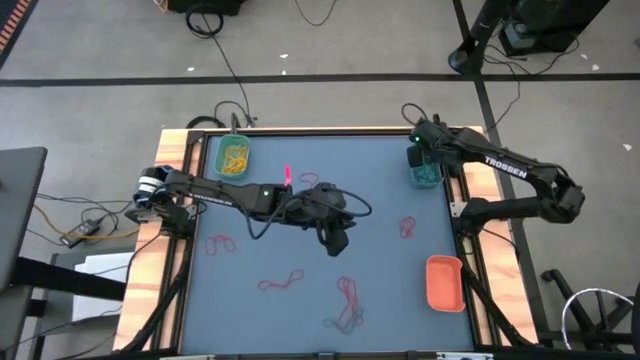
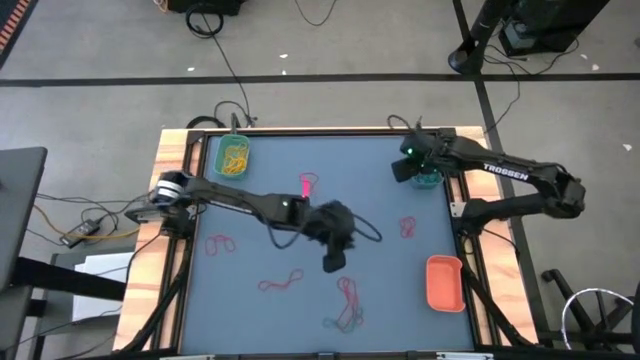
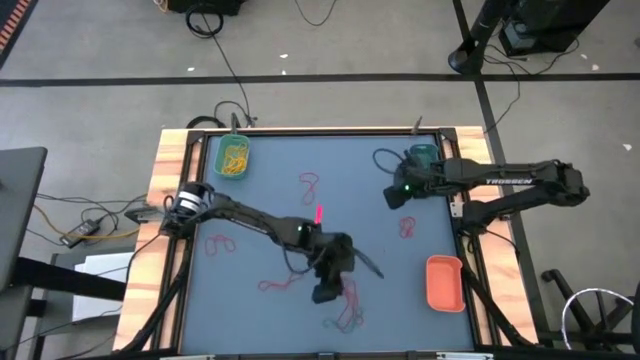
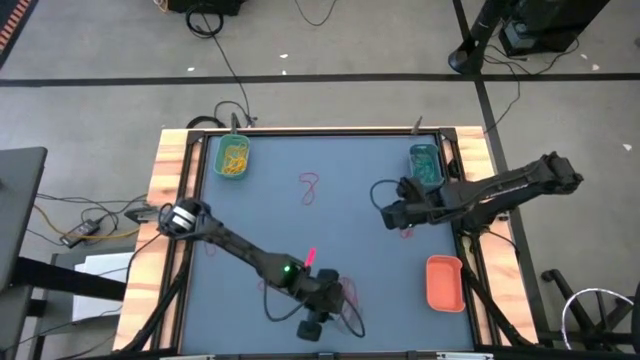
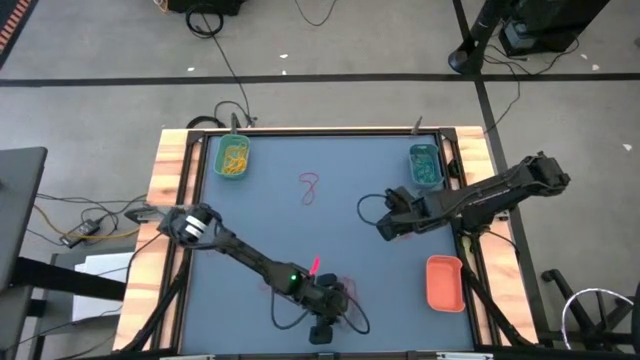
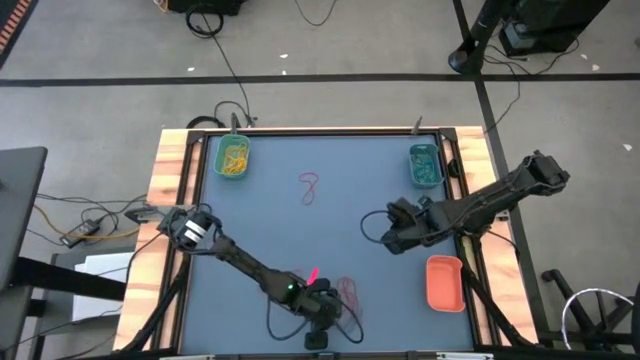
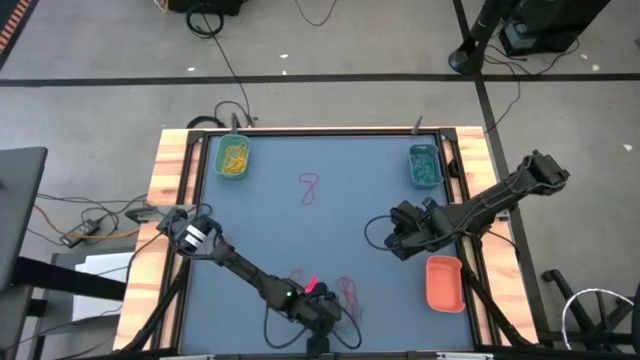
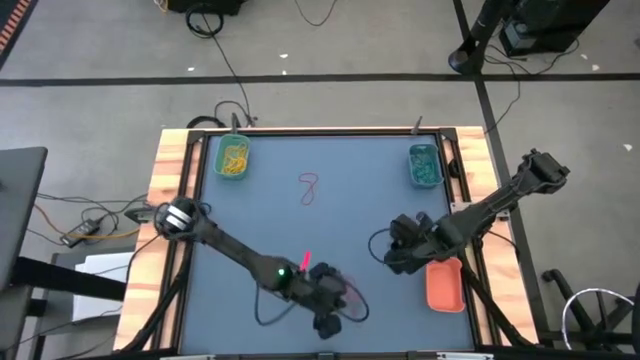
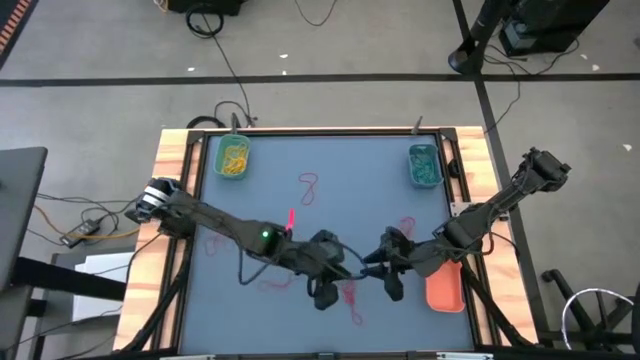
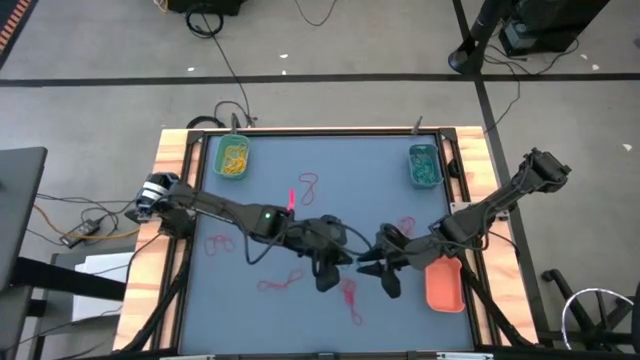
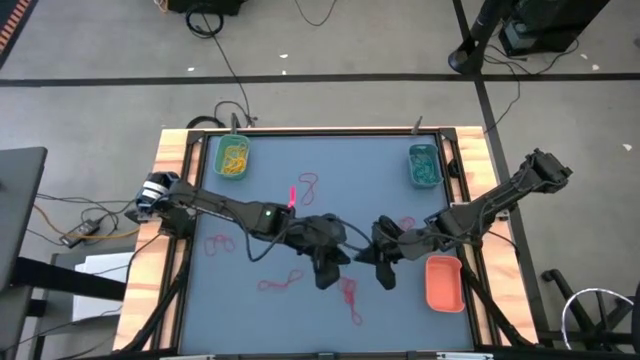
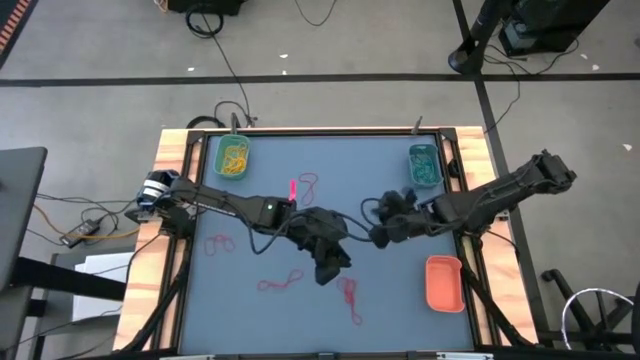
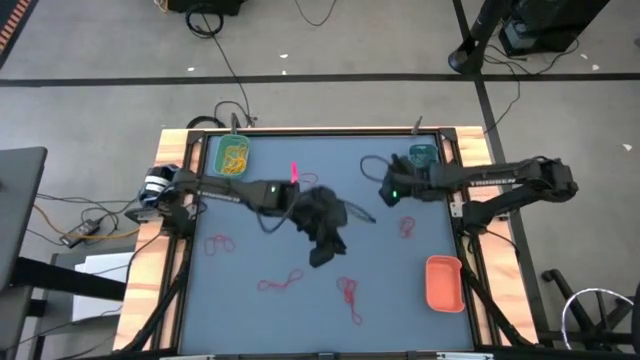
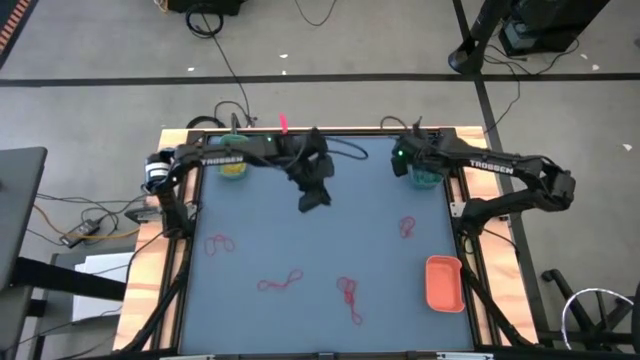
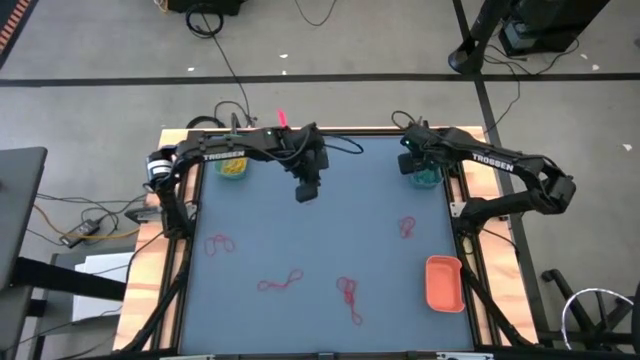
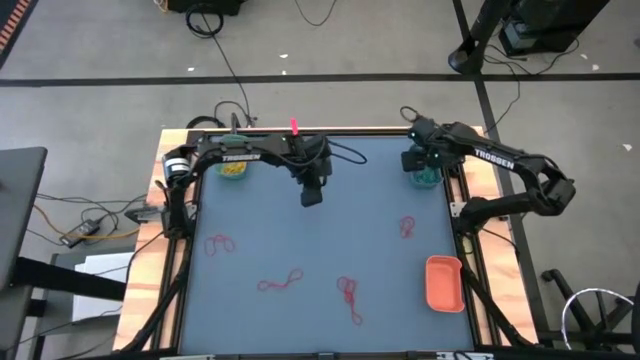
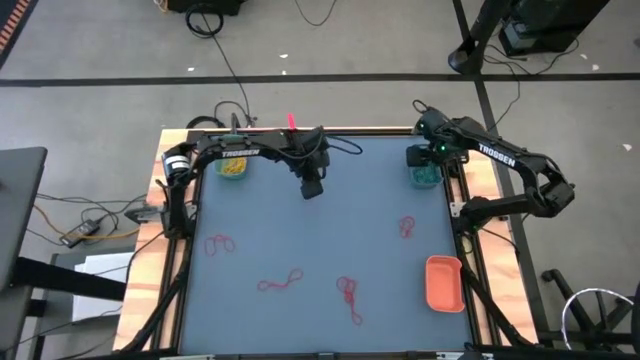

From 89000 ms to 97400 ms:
Task: Sort rubber bands into baskets
Put the blue rubber band into the blue bin

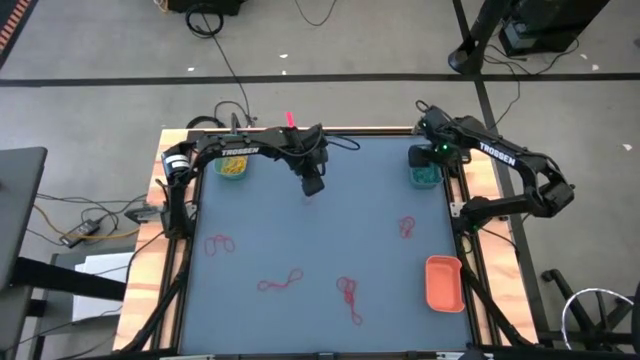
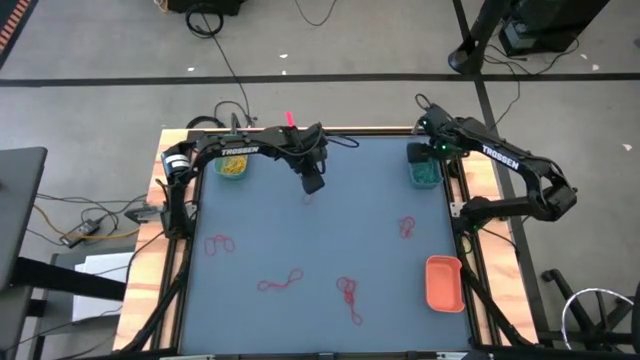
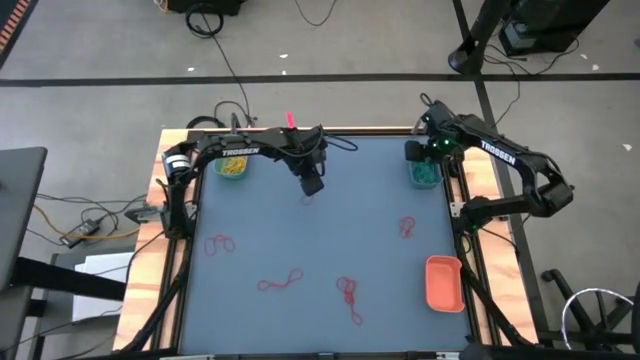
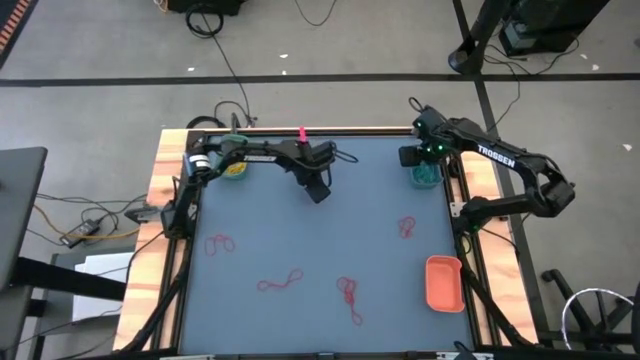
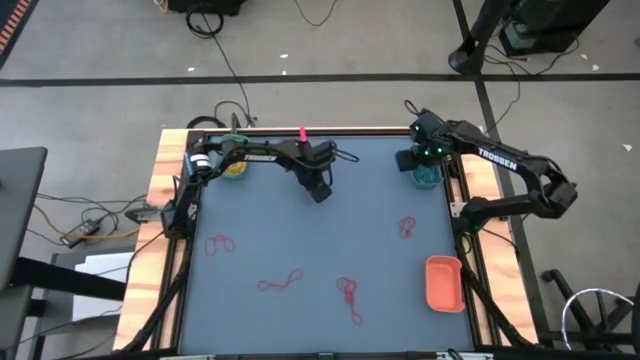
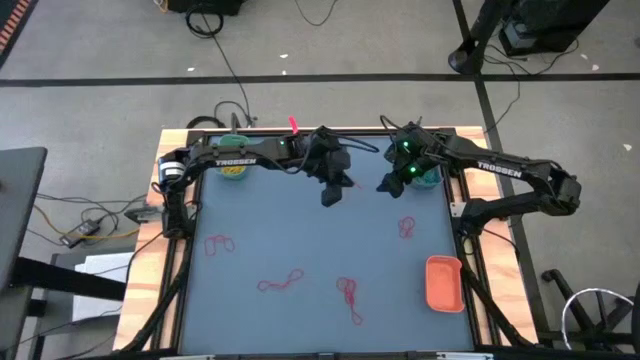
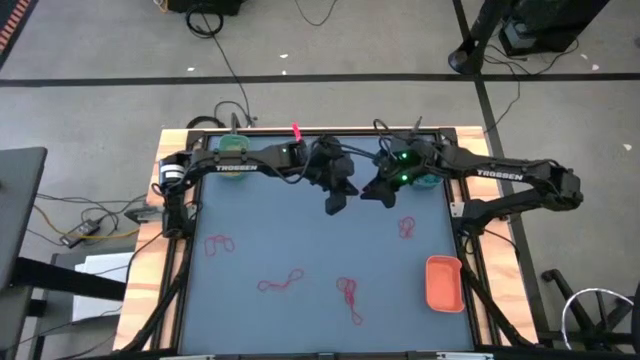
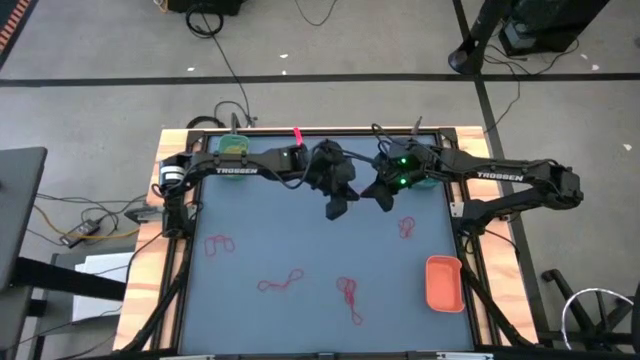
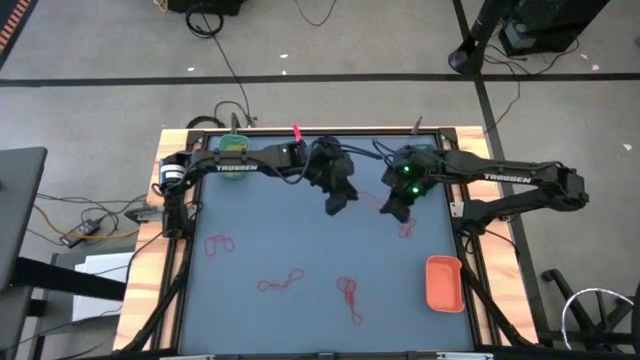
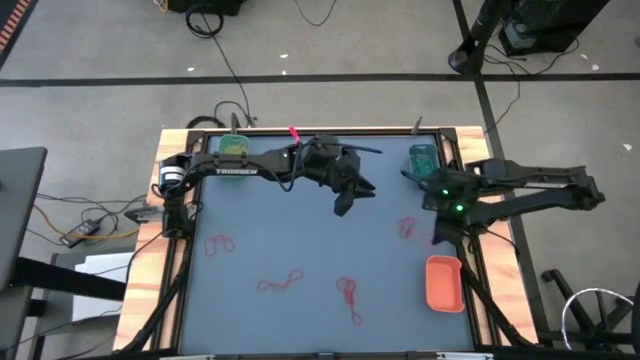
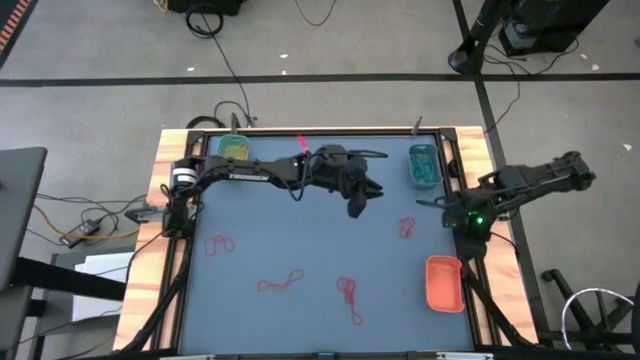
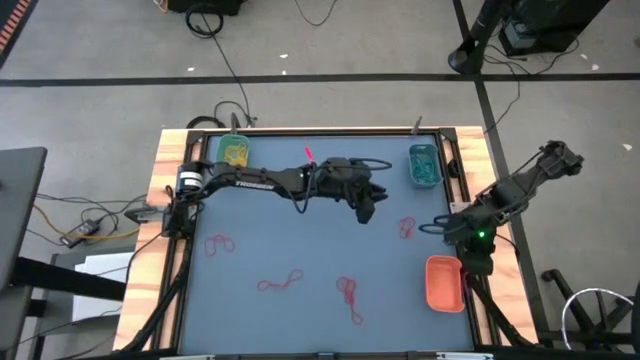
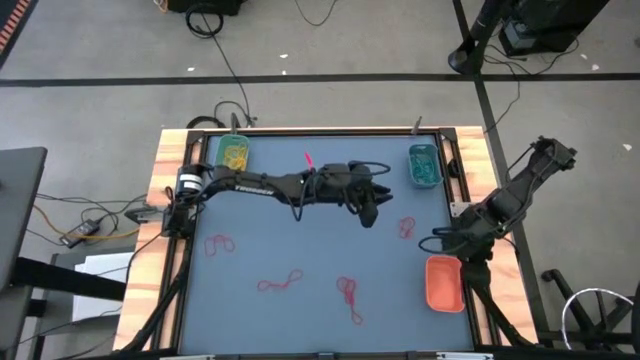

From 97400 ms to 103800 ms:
Put the red rubber band into the orange bin

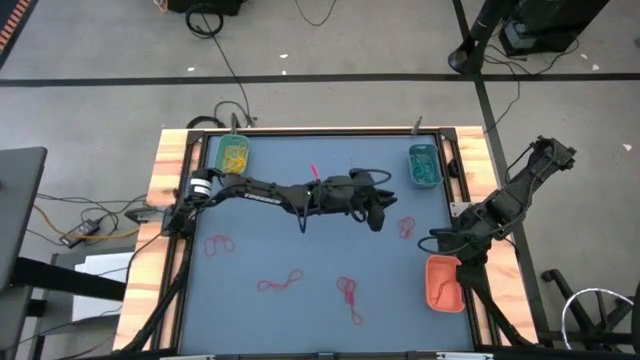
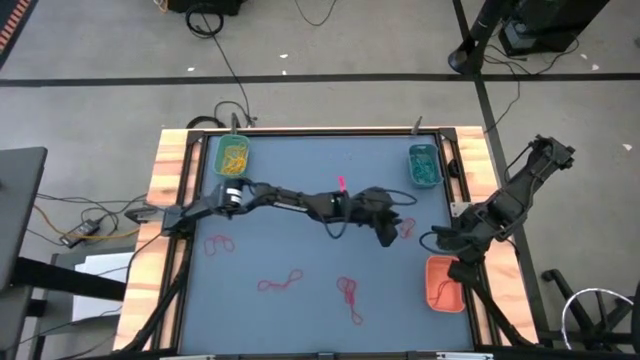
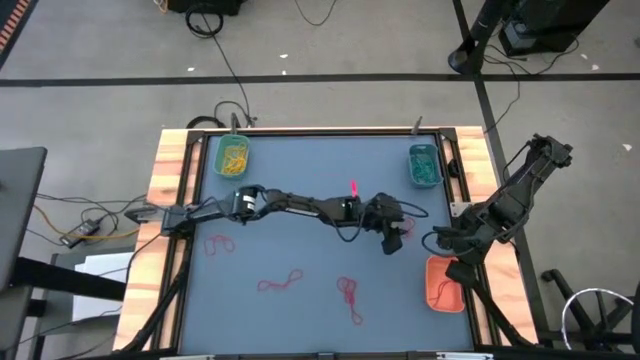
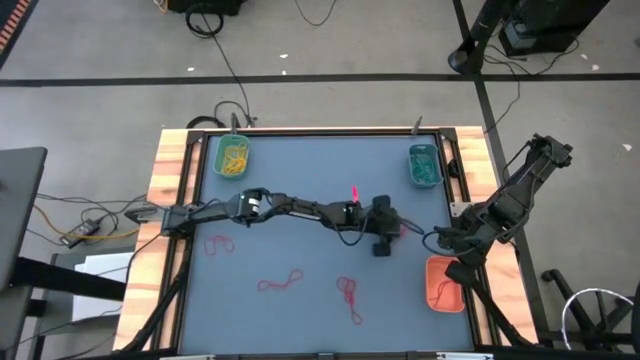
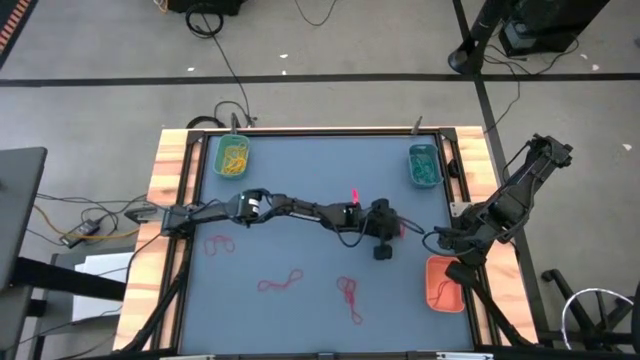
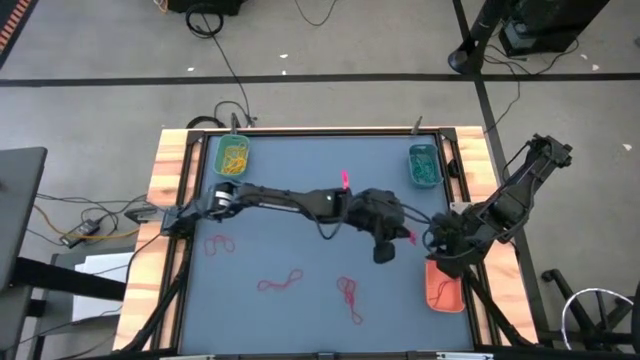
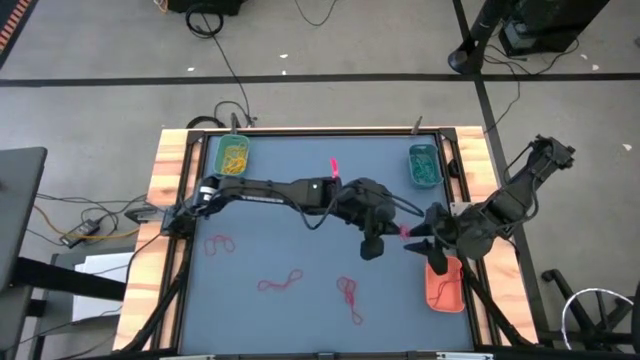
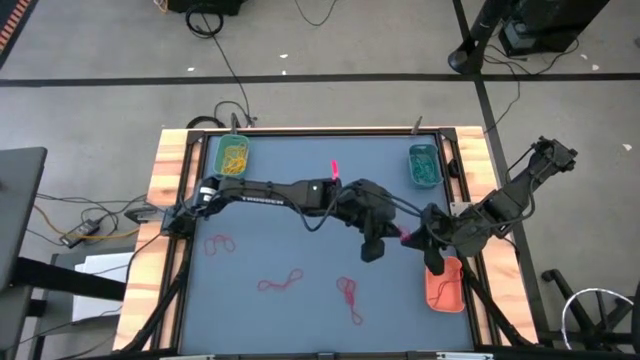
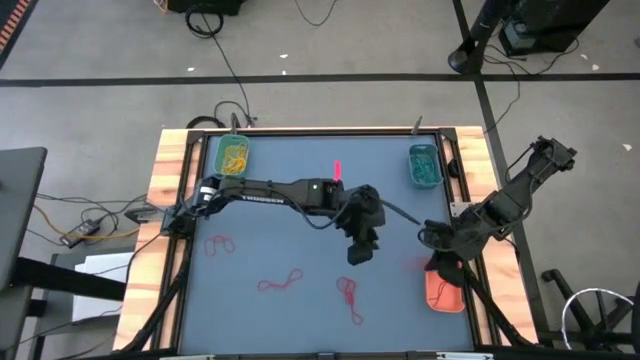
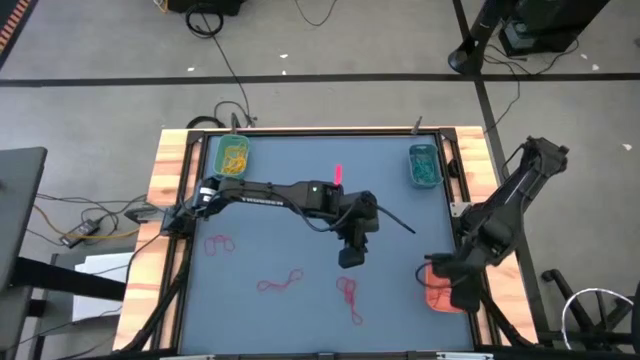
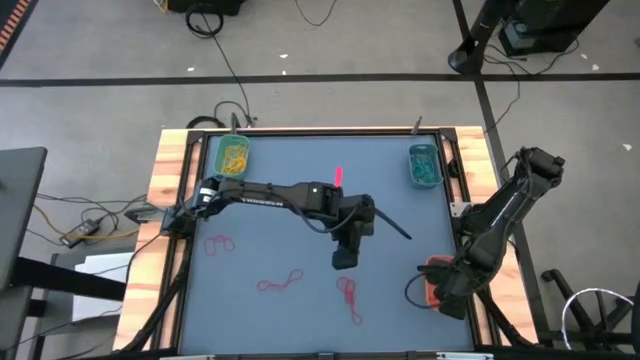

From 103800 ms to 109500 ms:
Put the red rubber band into the orange bin

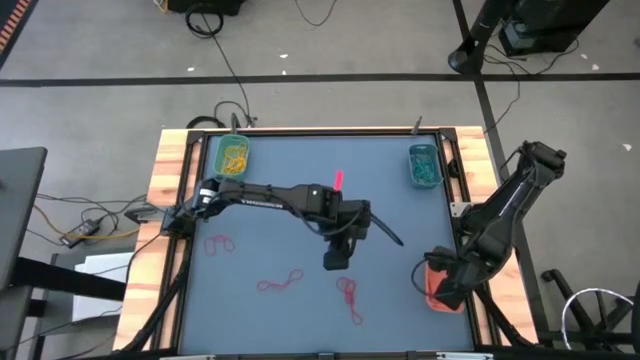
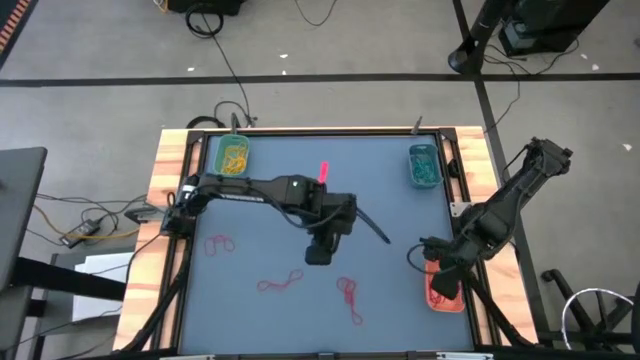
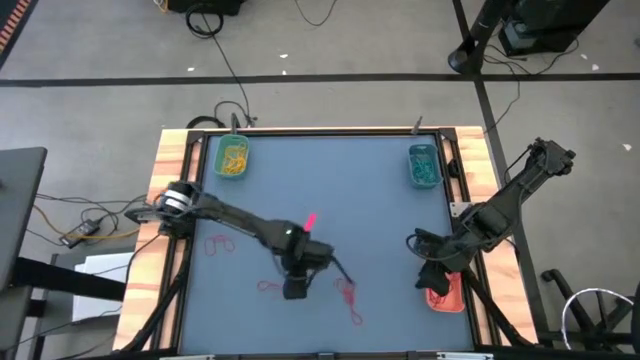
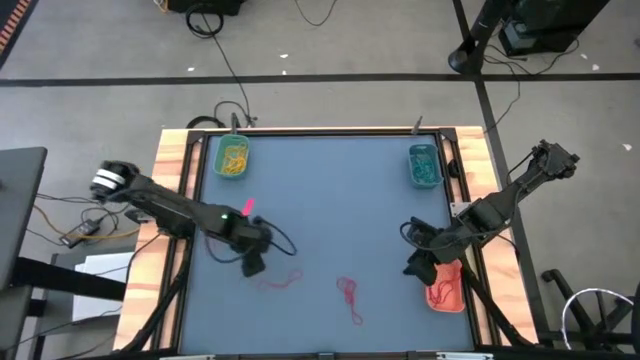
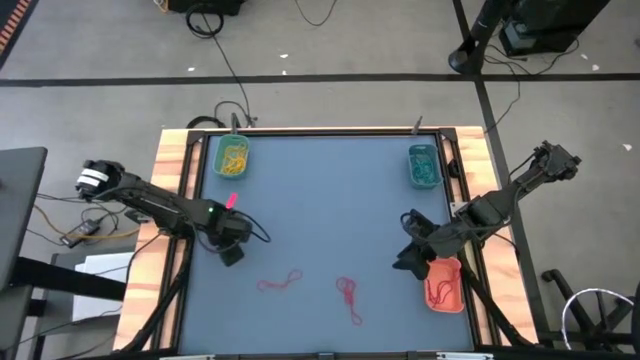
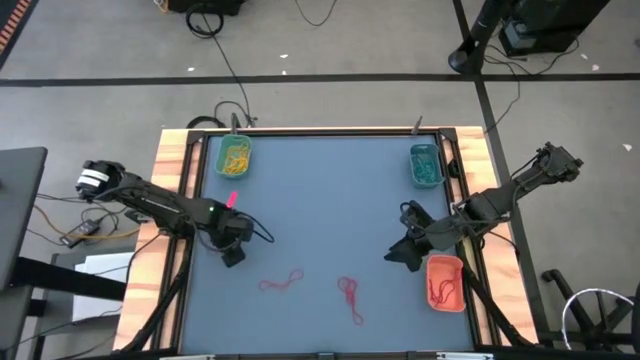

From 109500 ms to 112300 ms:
Put the red rubber band into the orange bin
